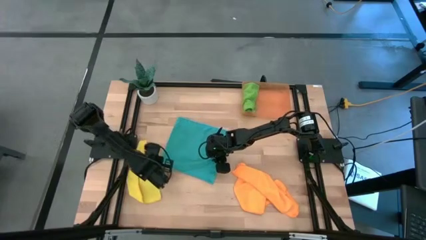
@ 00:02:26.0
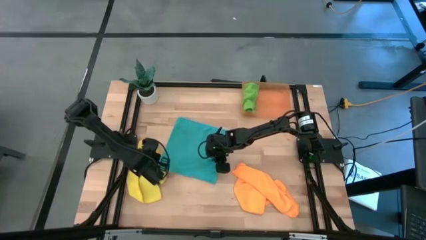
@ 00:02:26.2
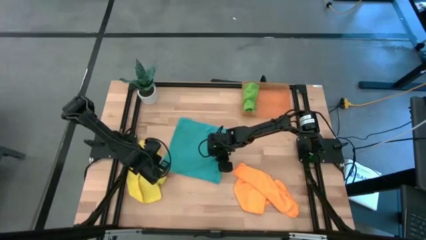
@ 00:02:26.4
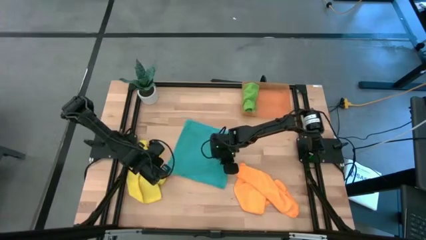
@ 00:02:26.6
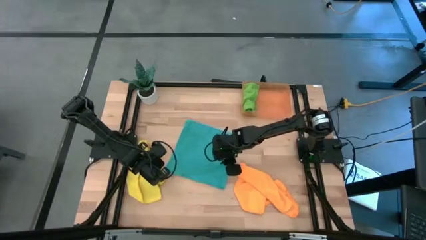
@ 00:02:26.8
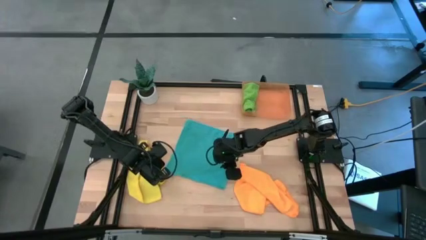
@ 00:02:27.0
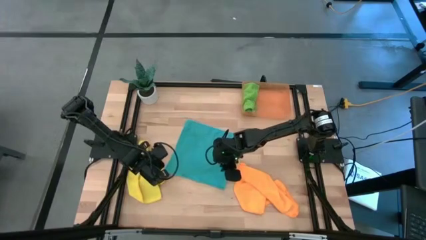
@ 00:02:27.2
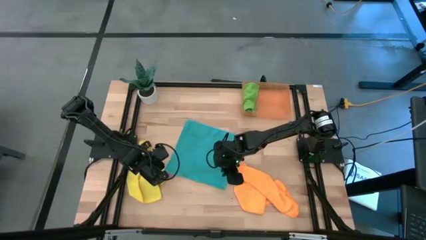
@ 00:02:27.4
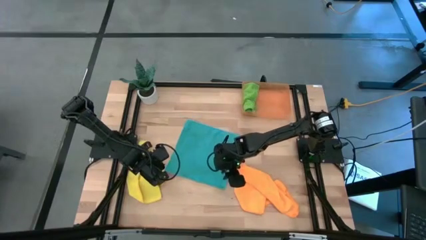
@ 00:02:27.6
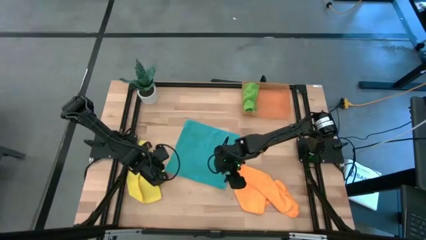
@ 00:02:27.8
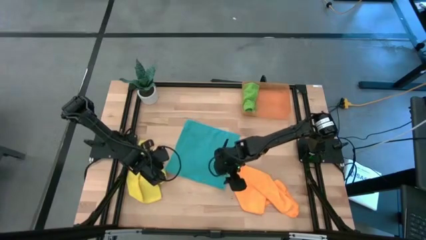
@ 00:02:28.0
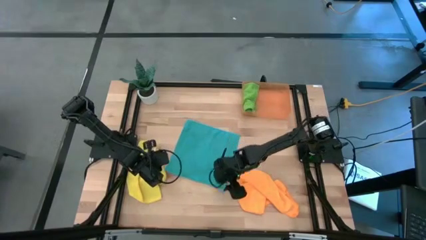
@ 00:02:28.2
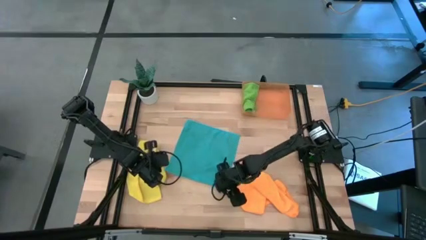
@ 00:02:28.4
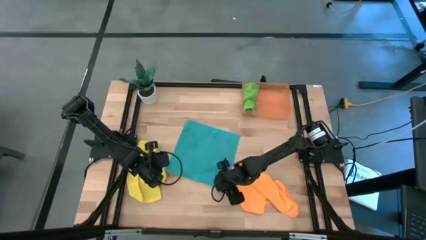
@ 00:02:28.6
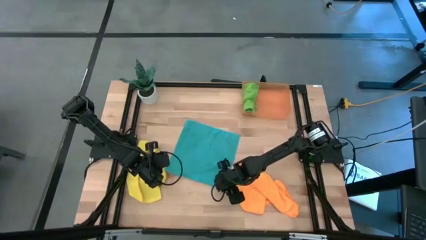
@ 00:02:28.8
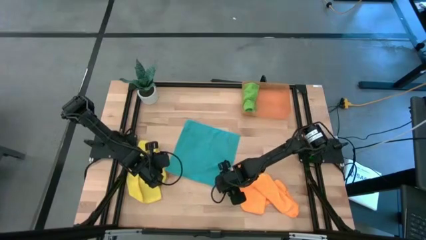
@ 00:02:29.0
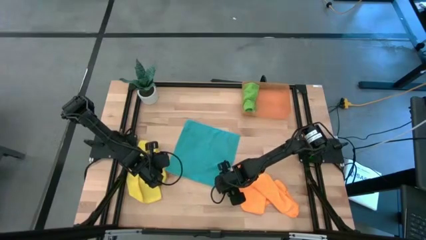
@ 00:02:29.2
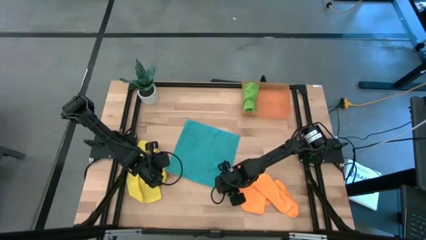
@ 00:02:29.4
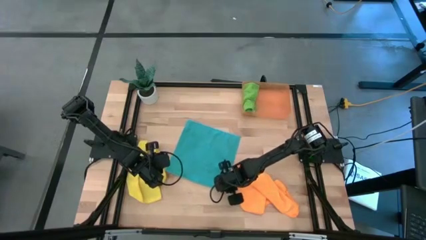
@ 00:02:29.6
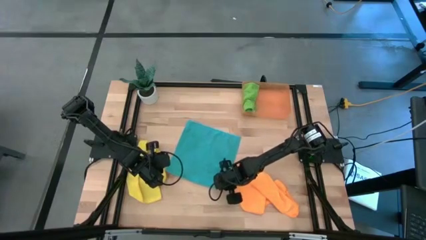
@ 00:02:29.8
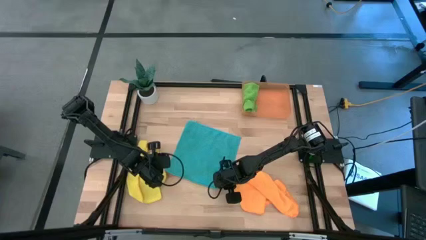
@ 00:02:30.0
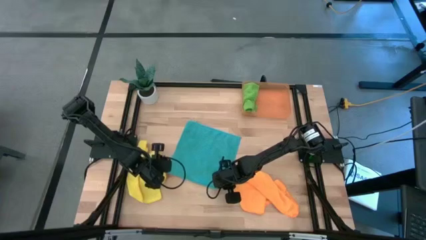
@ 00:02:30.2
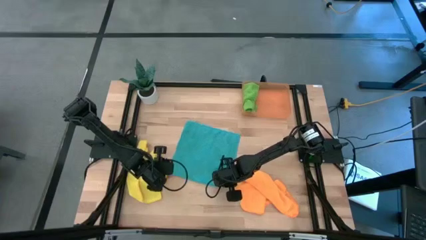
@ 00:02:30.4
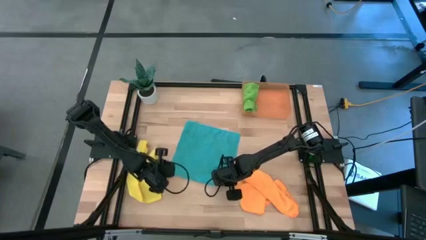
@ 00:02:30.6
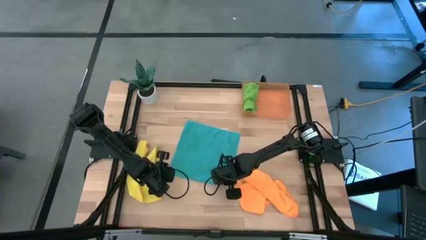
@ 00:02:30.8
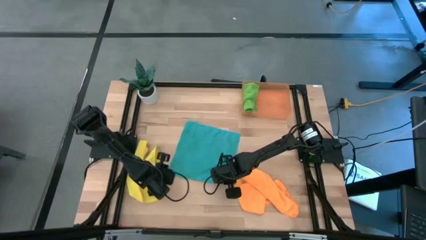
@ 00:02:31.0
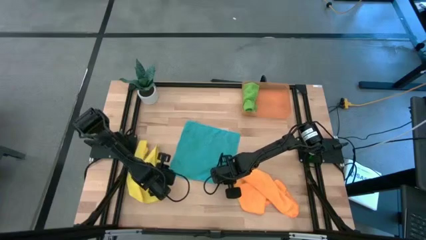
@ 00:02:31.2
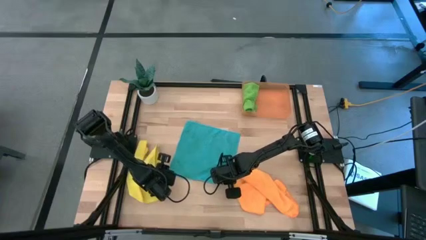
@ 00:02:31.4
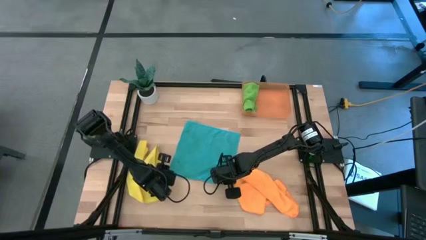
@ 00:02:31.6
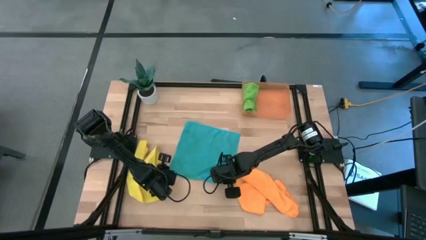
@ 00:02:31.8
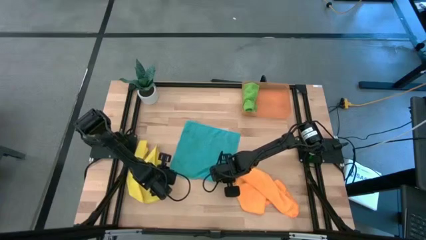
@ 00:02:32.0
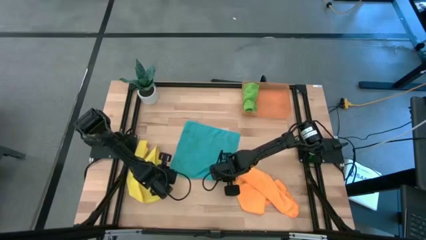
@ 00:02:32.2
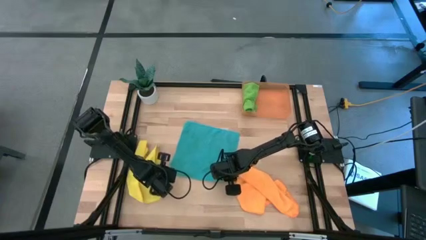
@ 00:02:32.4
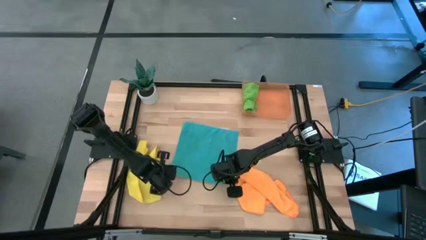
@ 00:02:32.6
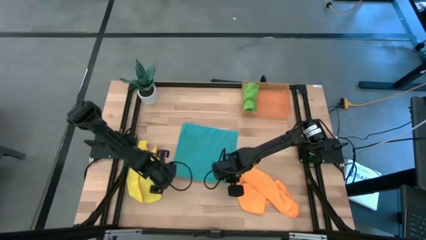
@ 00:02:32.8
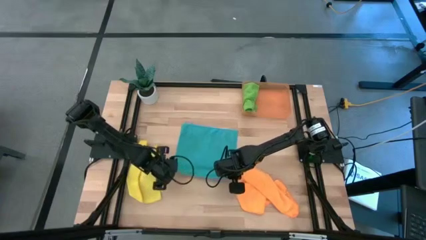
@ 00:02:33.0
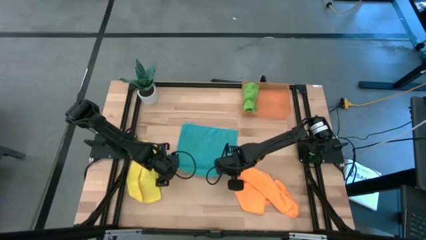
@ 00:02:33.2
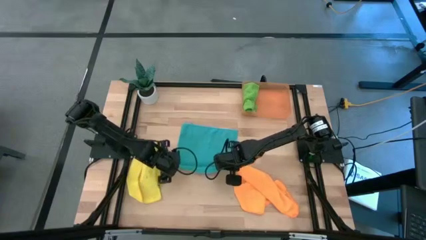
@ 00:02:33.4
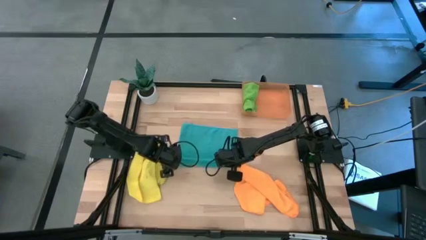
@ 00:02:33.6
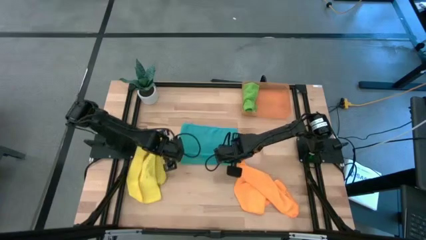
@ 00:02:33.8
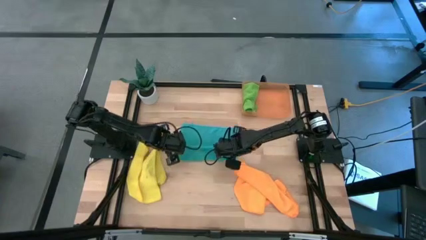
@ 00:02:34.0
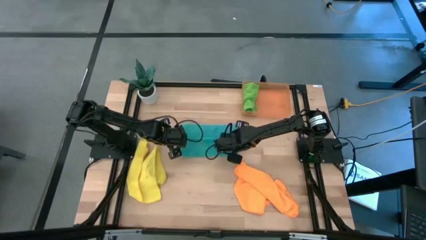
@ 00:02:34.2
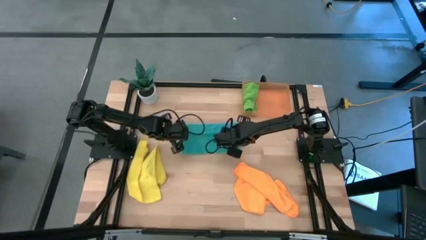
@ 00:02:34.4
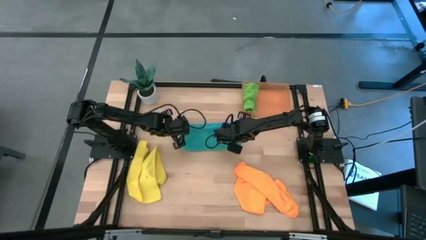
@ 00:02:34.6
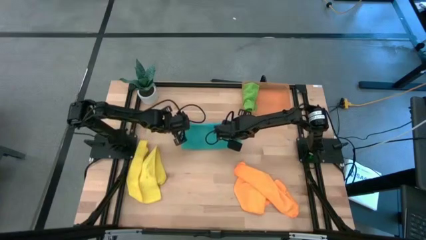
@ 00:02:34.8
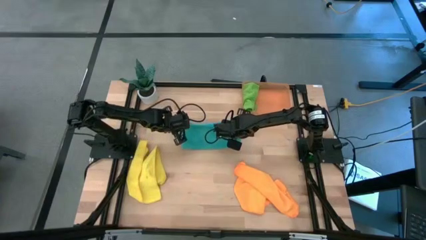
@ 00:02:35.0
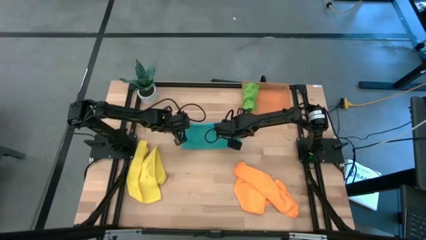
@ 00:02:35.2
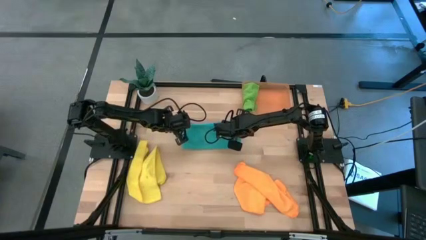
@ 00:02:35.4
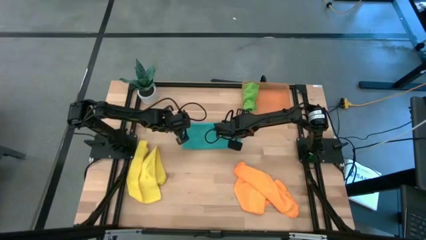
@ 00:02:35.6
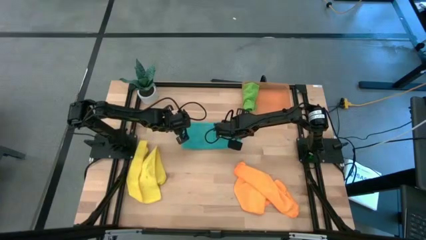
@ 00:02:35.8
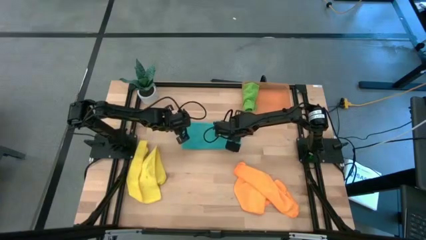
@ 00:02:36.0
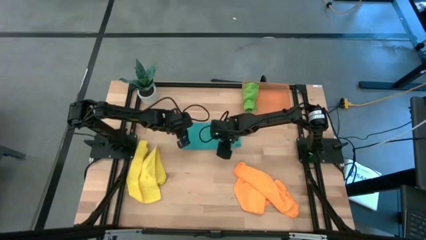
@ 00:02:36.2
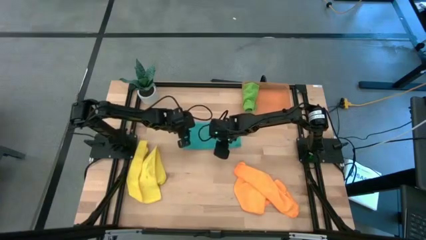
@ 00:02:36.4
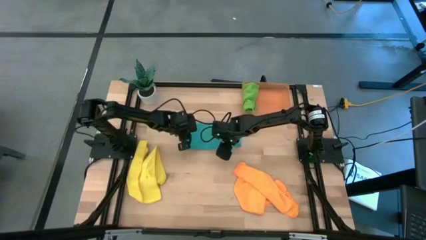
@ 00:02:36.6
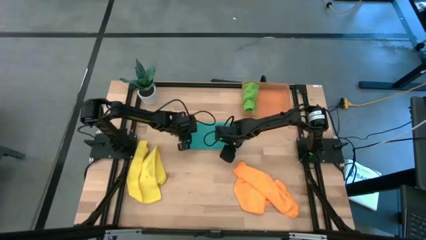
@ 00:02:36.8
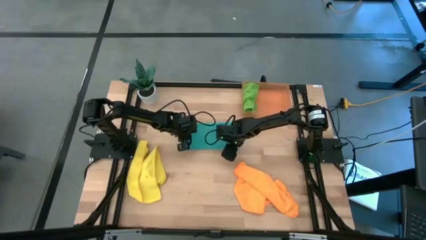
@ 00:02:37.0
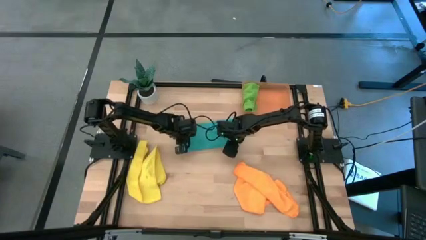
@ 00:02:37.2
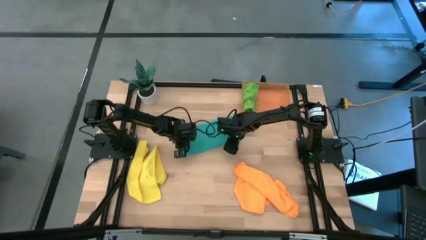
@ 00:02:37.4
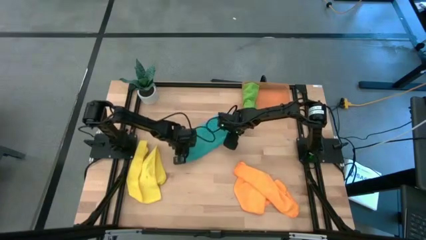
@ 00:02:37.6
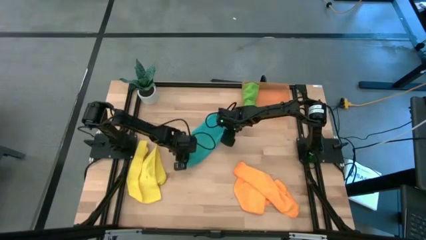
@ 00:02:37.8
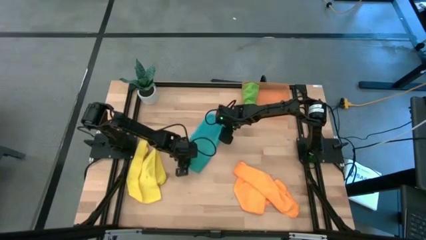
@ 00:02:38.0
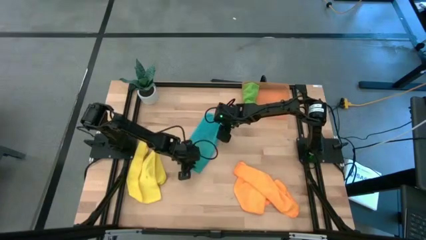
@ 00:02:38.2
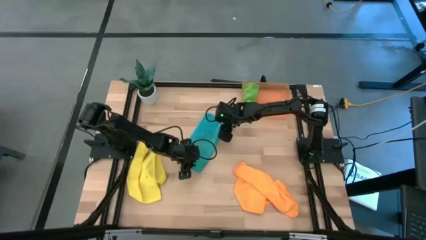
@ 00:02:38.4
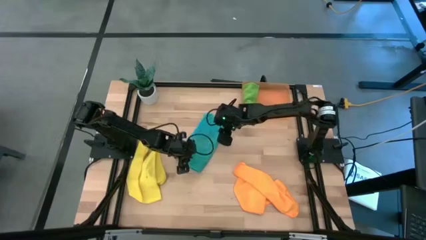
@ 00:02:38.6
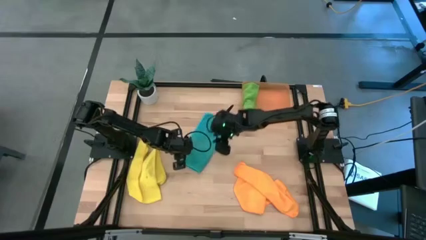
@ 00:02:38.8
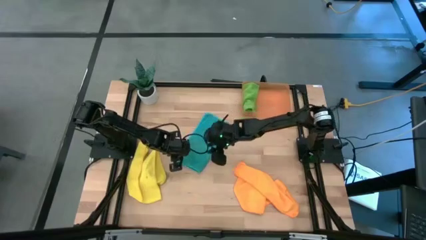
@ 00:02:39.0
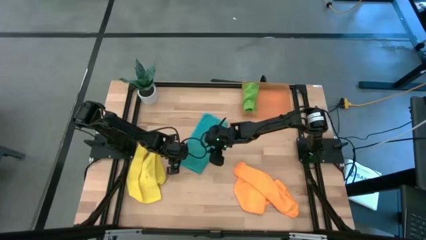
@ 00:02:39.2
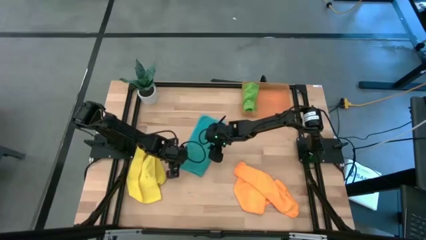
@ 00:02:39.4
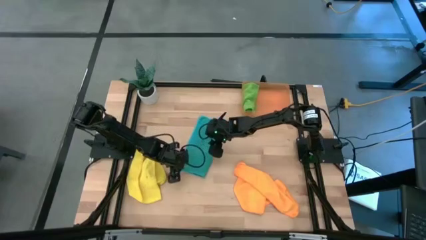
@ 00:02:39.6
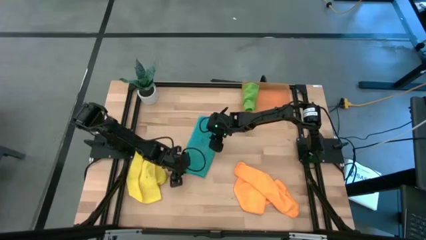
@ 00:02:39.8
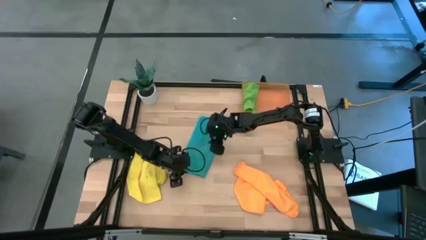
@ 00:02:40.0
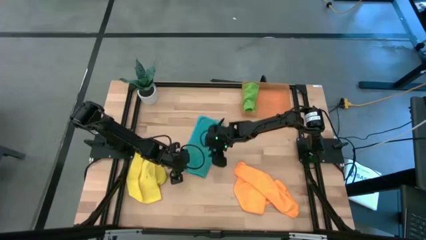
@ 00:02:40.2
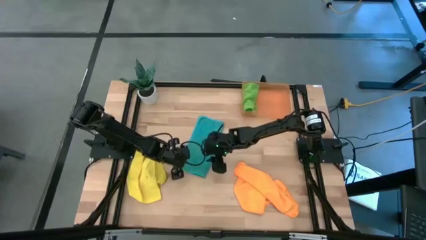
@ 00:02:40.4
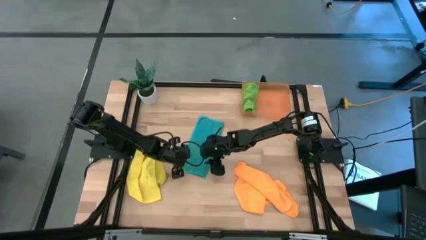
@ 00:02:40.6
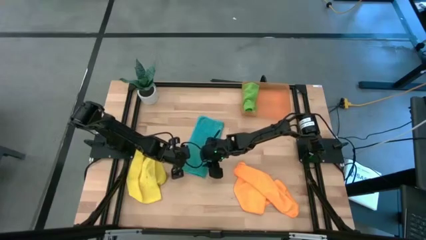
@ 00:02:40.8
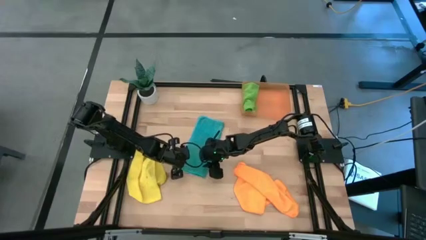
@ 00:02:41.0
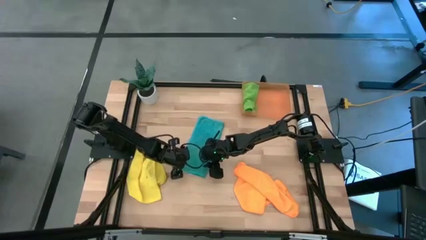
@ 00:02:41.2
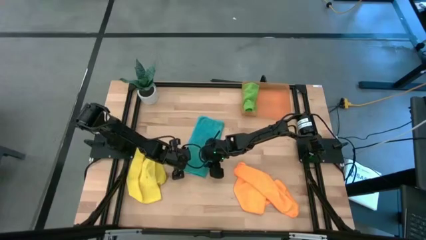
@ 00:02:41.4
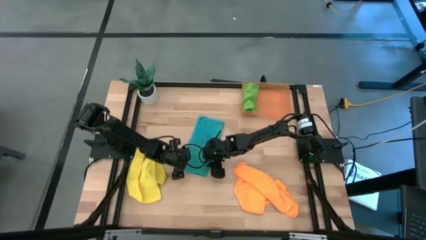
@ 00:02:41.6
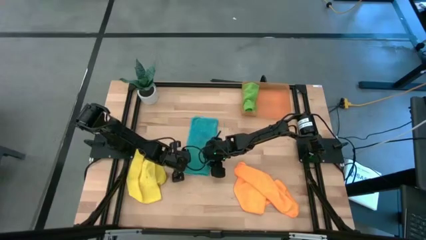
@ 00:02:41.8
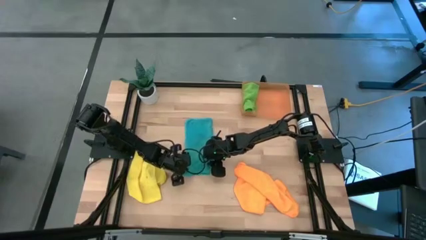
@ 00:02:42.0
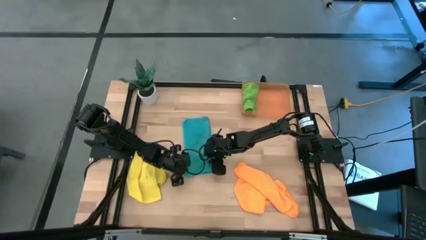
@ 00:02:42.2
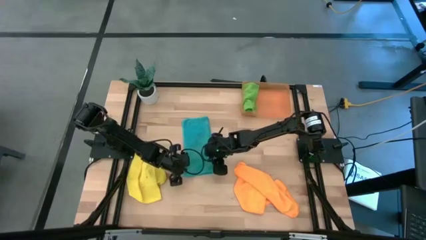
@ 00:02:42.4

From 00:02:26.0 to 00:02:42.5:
Task: Roll microfiber towels into tight, uniform cylinder then place into a basket
Fold the blue towel
